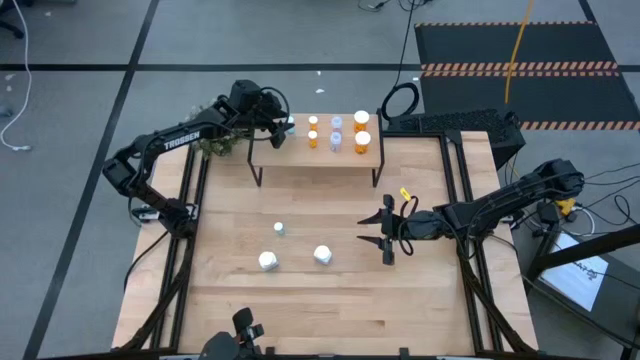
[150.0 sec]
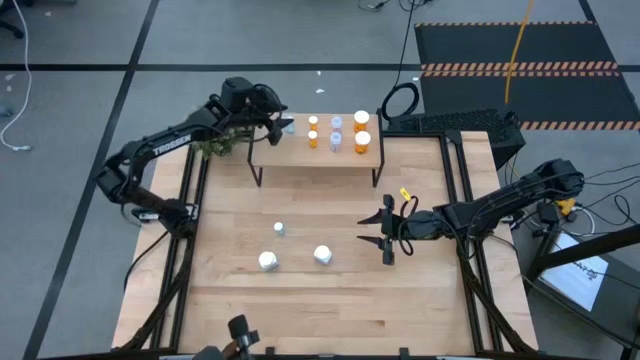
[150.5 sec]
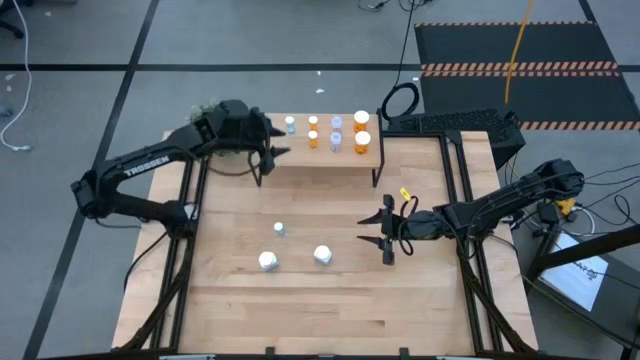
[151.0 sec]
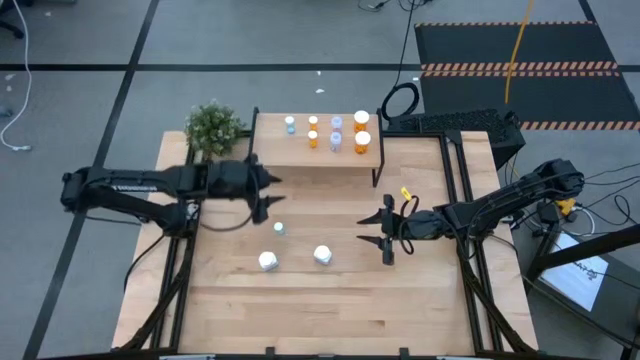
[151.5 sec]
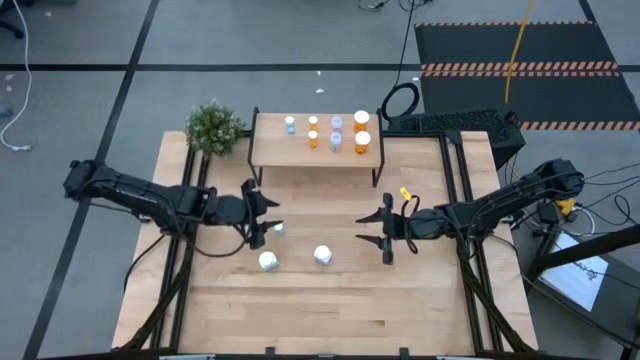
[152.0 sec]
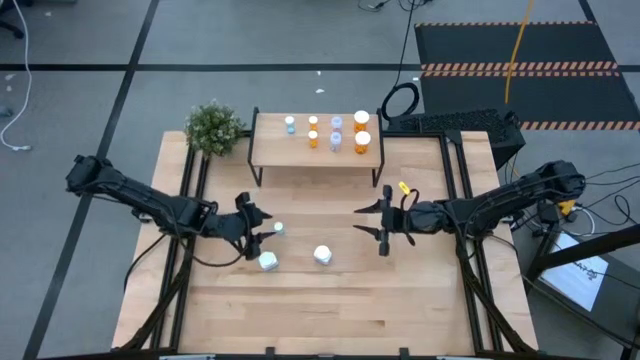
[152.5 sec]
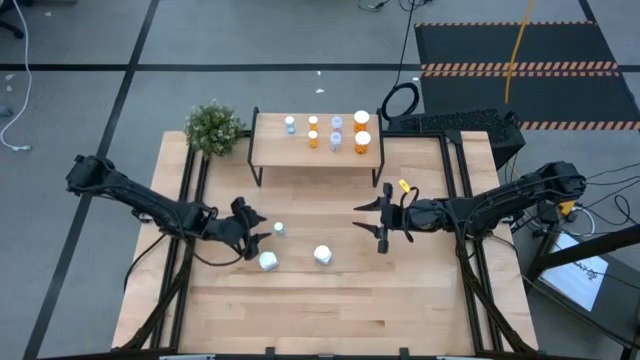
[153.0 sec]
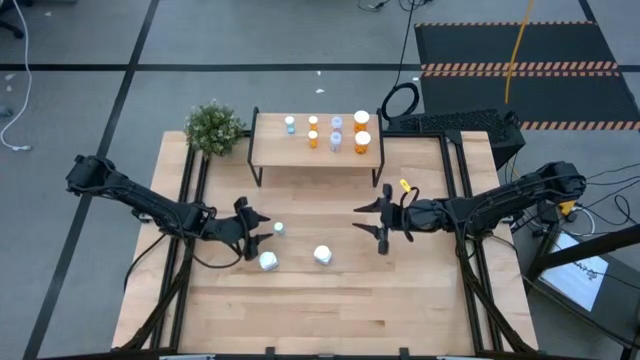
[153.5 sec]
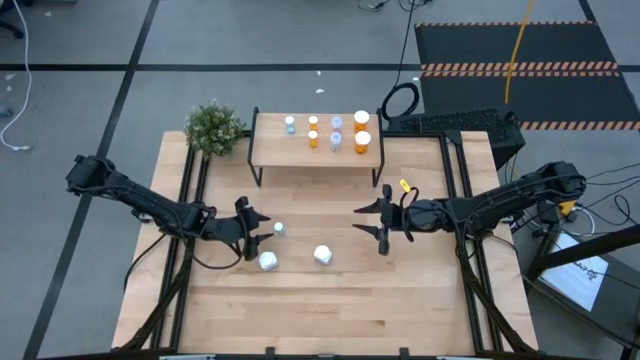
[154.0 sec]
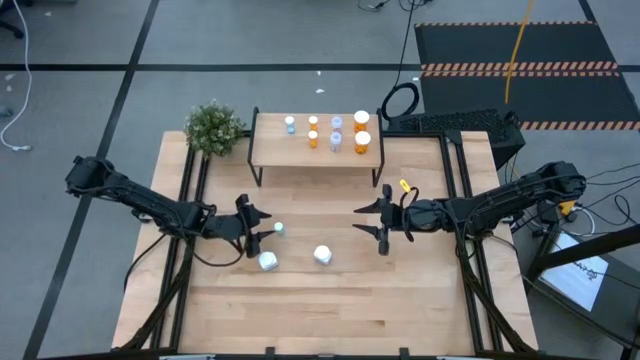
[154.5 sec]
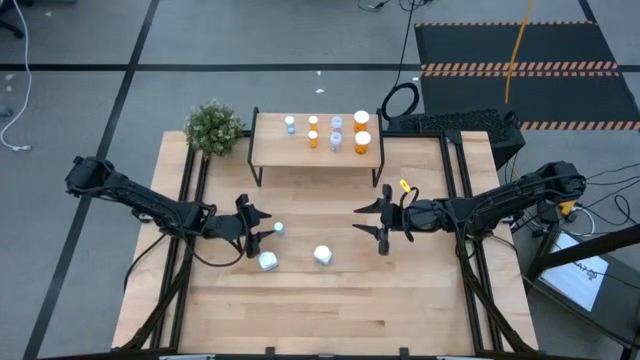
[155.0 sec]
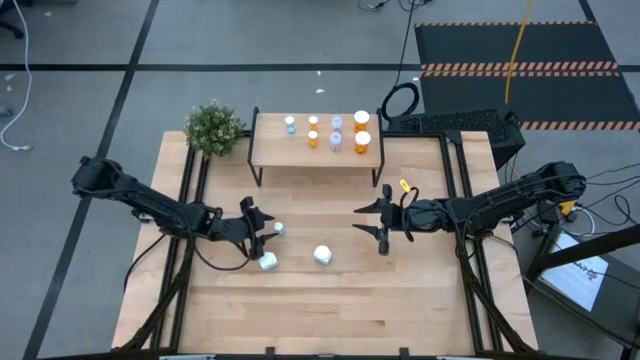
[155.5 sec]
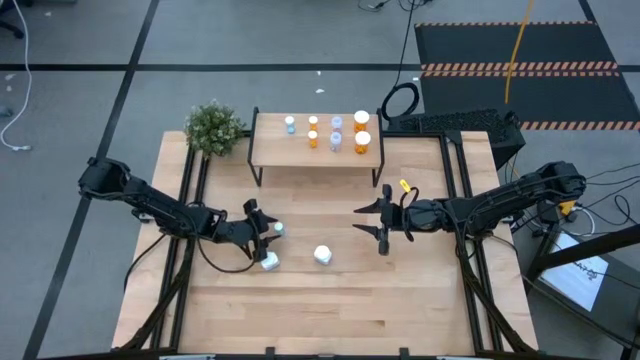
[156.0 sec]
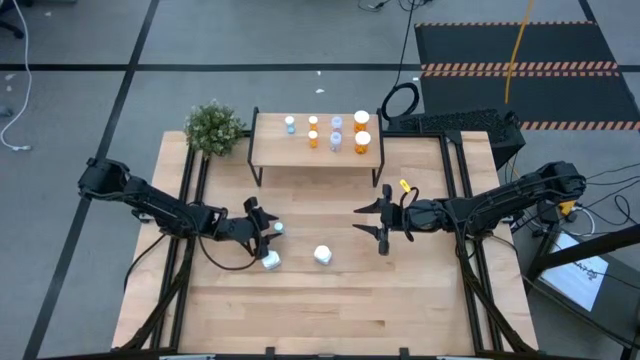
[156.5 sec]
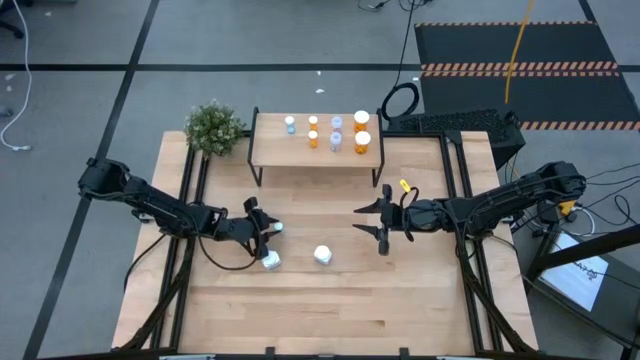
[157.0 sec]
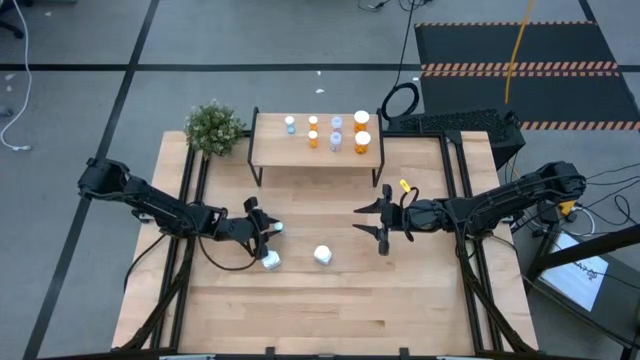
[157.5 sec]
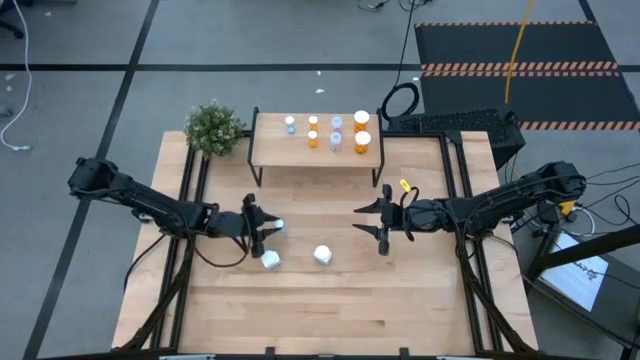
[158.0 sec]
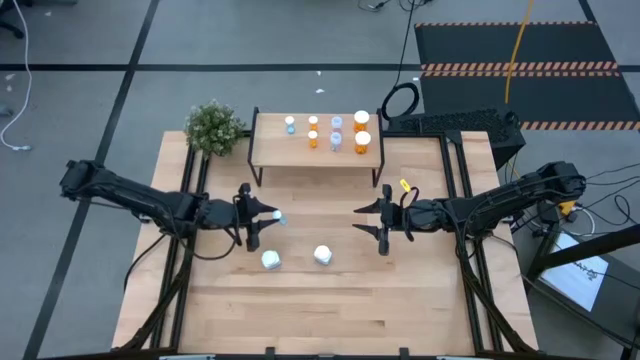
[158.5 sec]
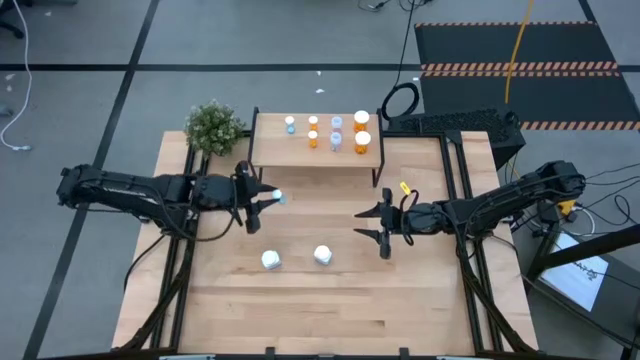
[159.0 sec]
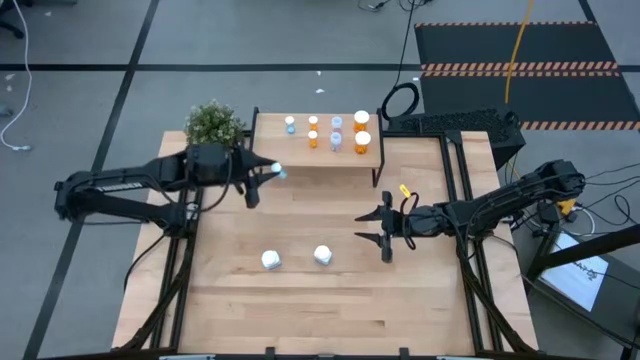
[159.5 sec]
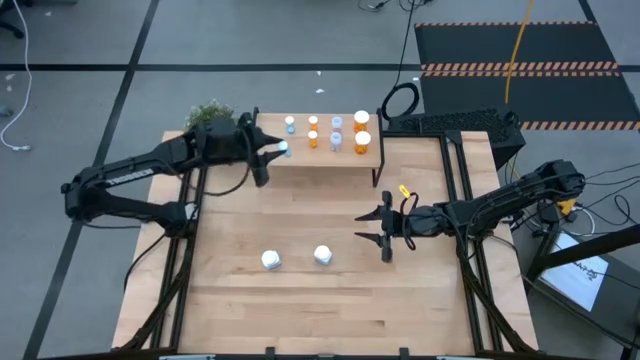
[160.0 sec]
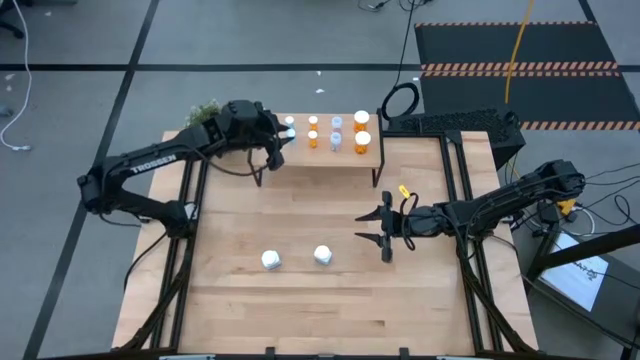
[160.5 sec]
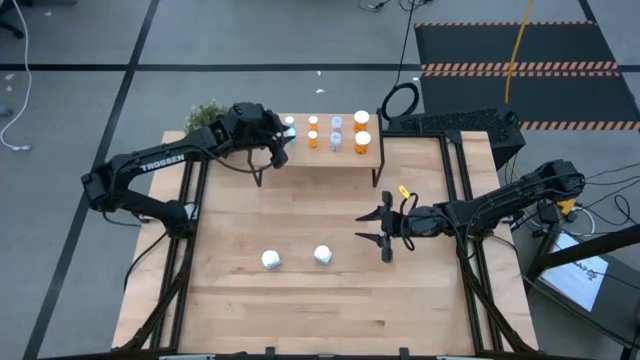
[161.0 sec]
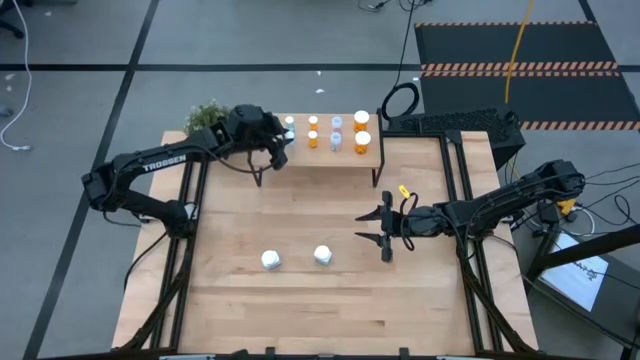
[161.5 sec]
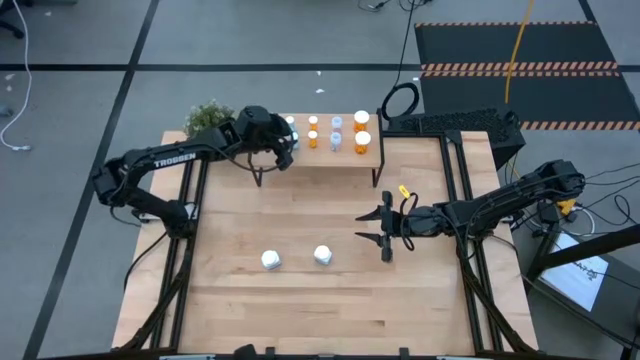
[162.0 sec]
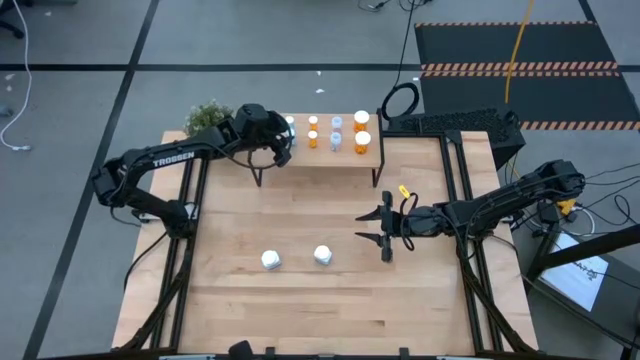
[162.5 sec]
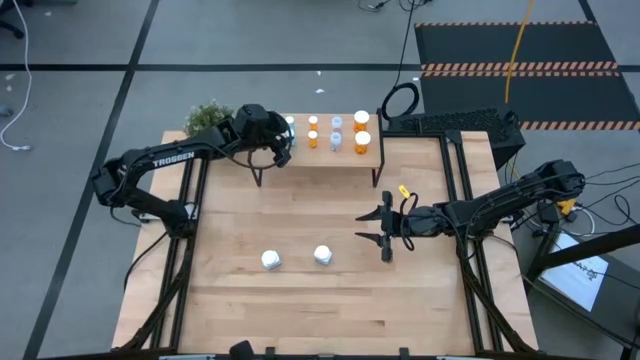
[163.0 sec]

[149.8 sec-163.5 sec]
Task: Pick and place medicine bottles onto shelf by color
Put the small blue pill bottle on the shelf aligned with the small blue pill bottle

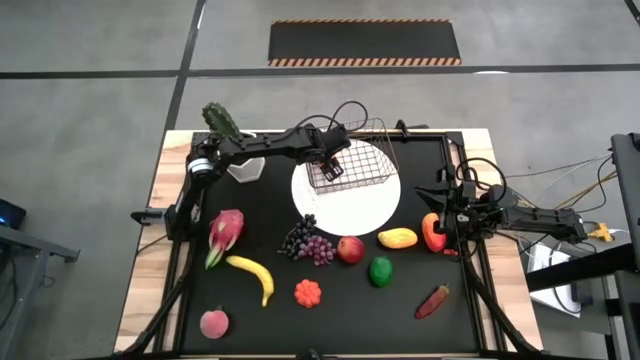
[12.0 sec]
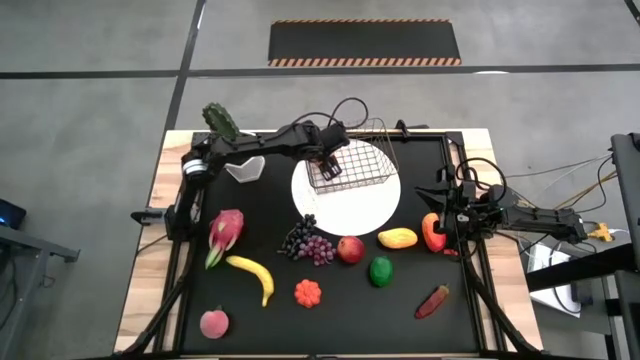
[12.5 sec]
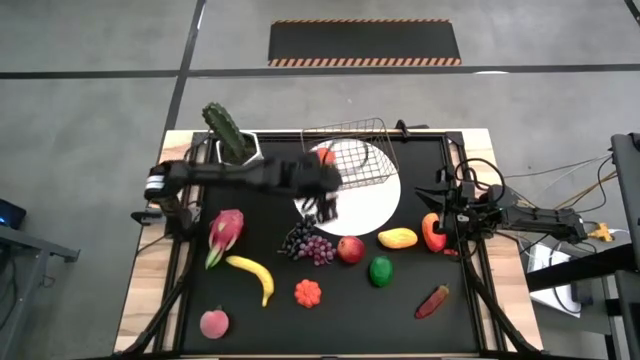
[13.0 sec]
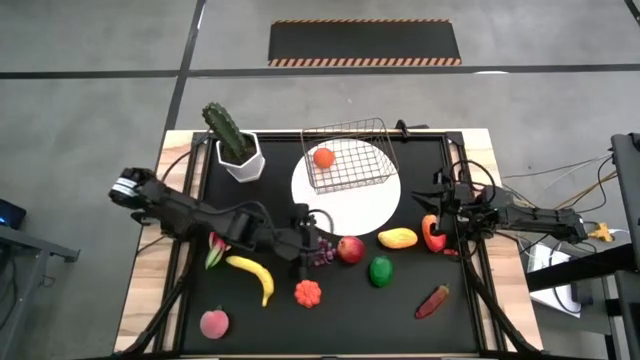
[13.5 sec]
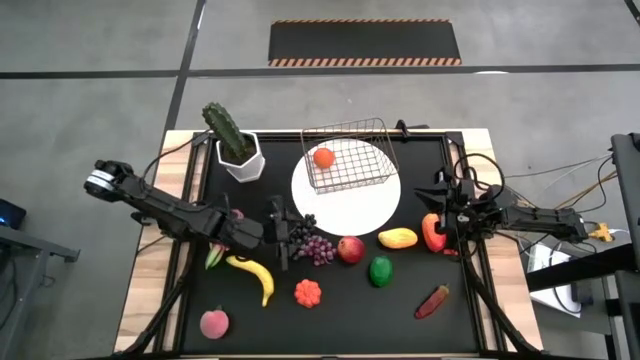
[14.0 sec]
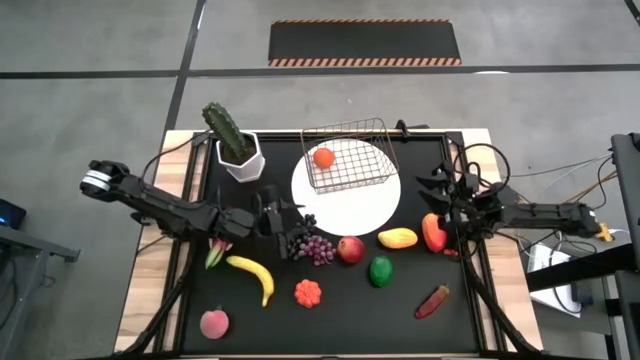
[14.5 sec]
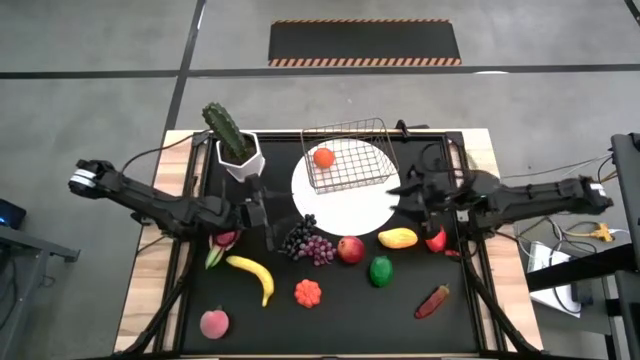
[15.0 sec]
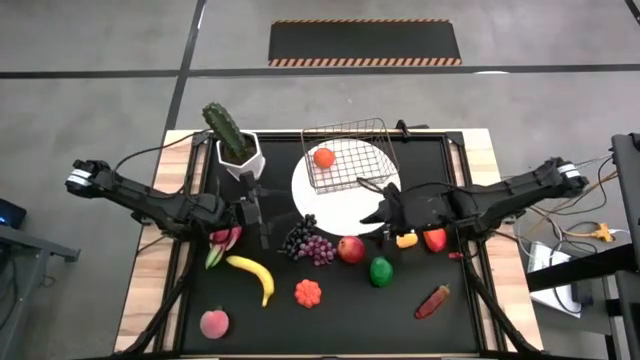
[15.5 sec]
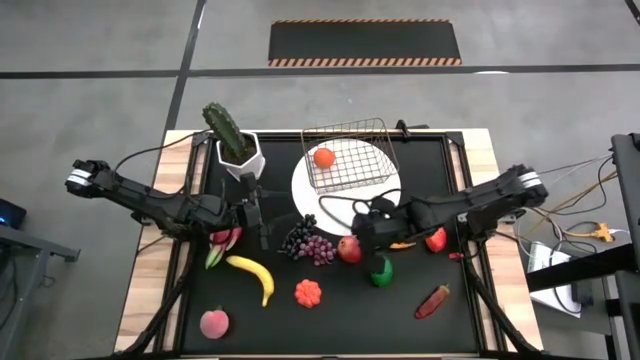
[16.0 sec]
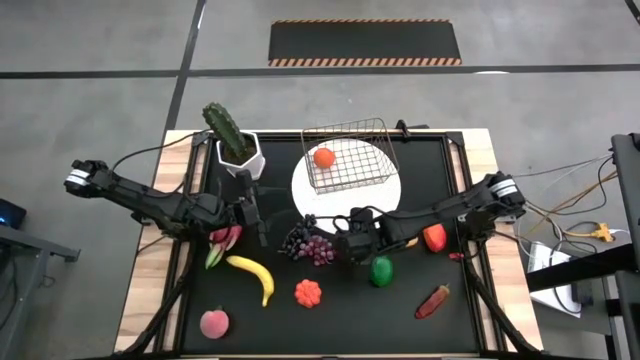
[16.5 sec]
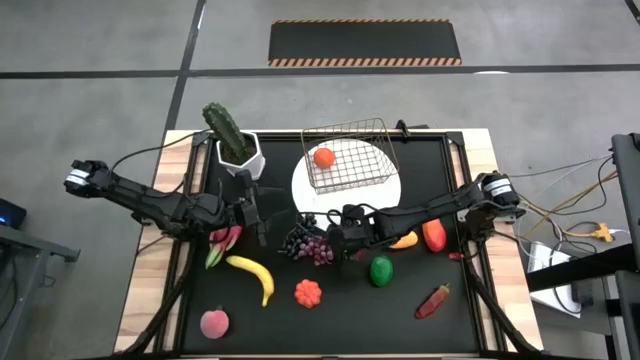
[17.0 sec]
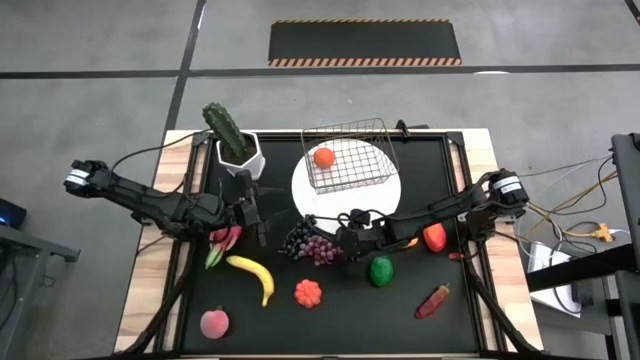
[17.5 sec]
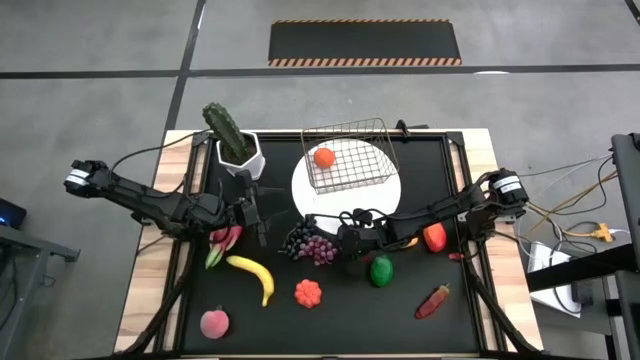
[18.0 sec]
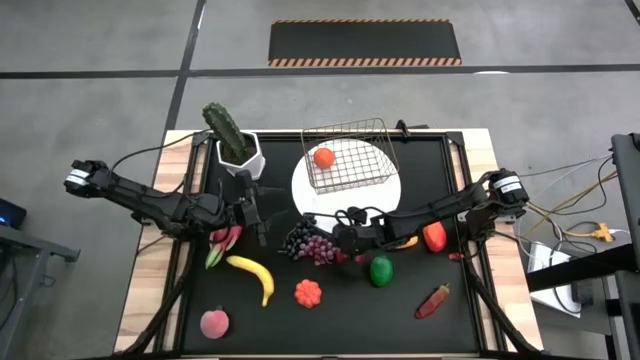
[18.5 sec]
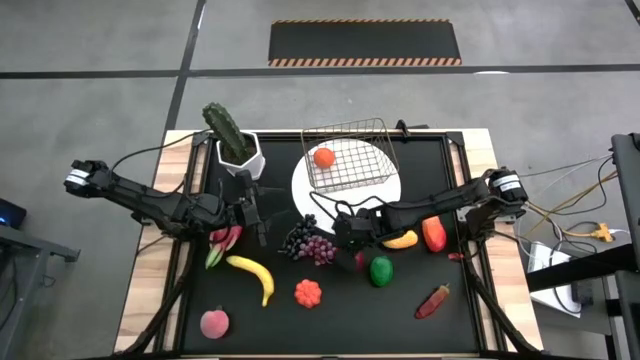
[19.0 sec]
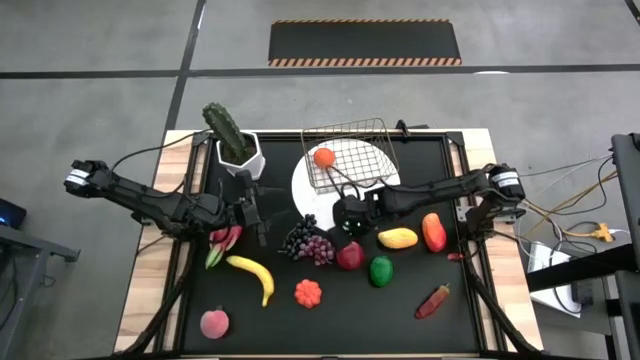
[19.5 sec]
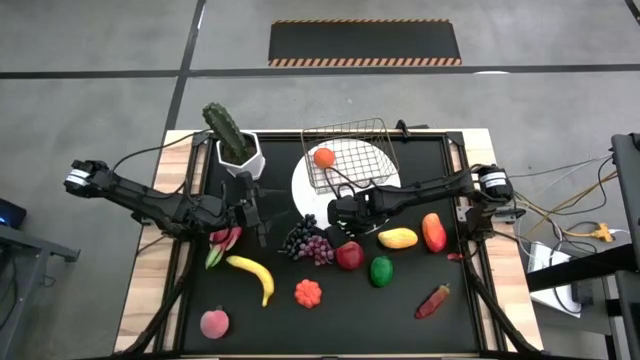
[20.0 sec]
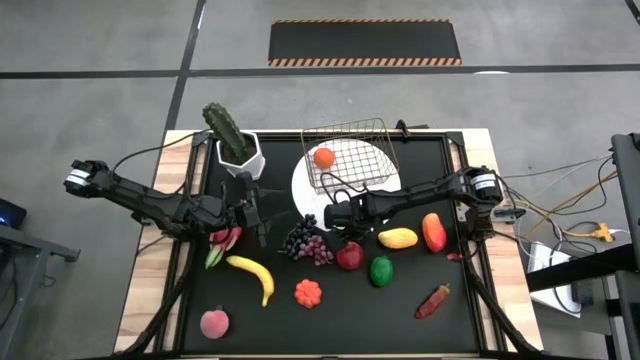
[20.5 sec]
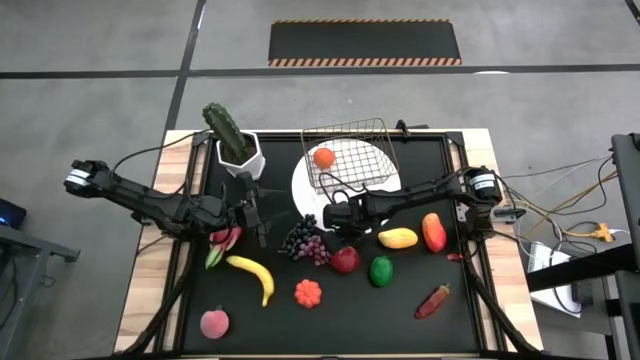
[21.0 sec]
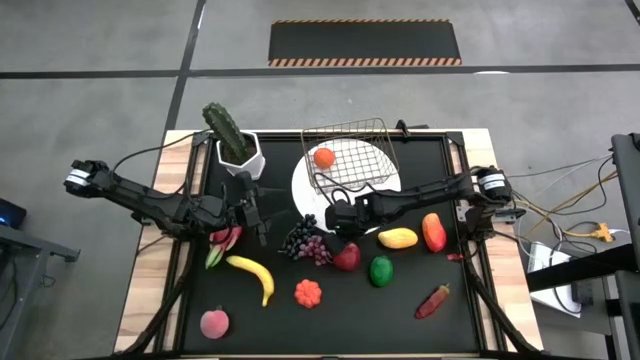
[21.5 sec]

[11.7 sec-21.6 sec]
Task: Build produce basket
Put the red pomegranate into the wire basket
